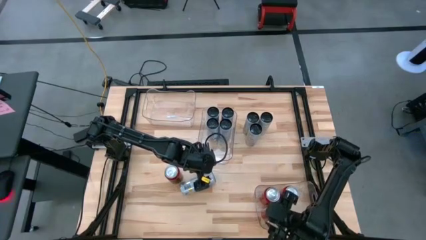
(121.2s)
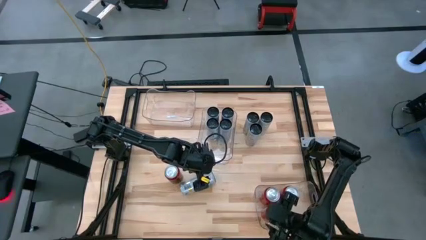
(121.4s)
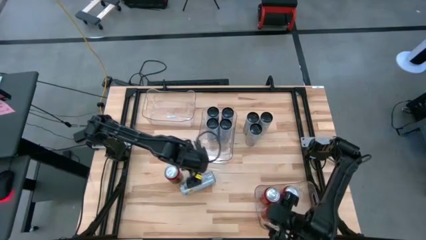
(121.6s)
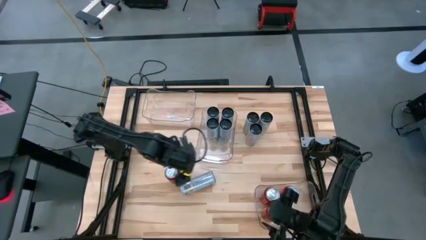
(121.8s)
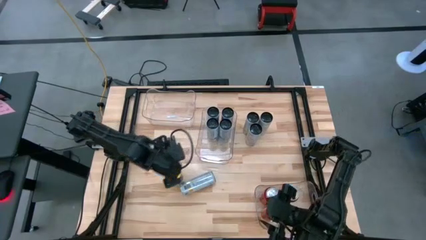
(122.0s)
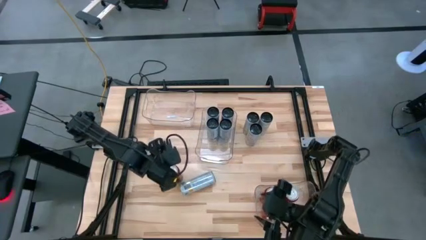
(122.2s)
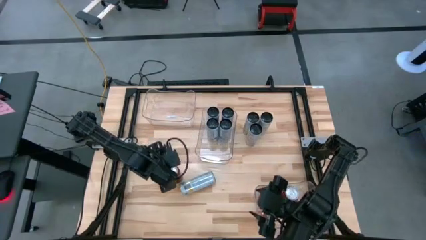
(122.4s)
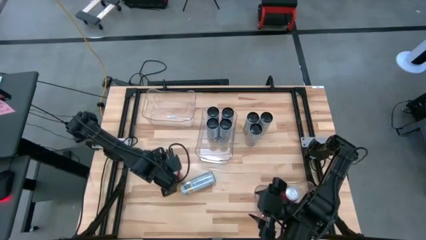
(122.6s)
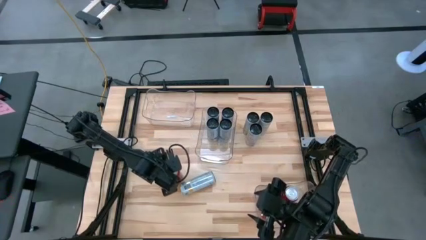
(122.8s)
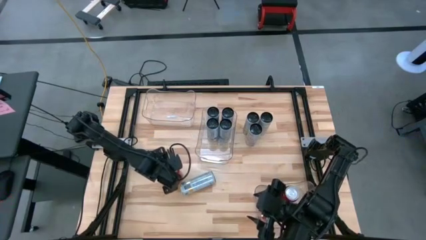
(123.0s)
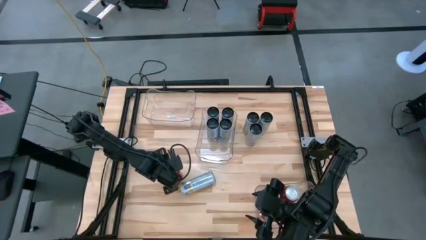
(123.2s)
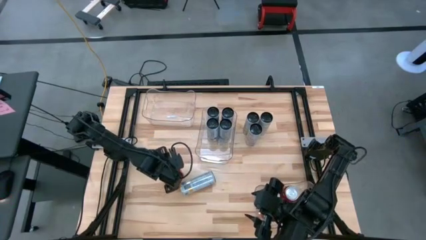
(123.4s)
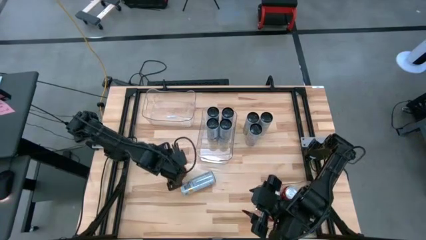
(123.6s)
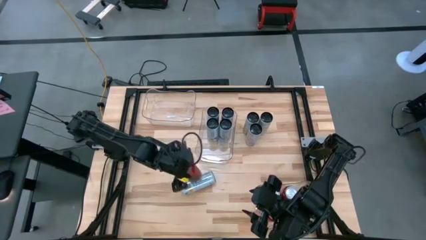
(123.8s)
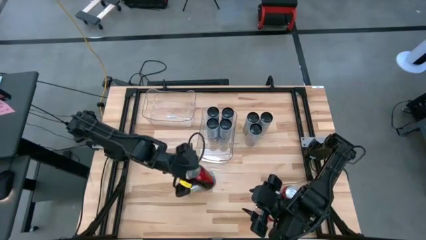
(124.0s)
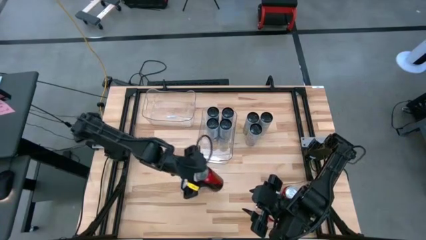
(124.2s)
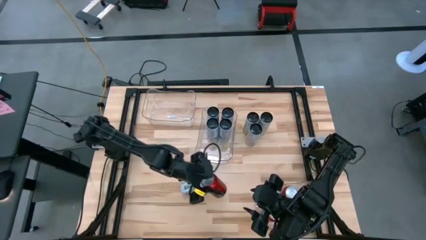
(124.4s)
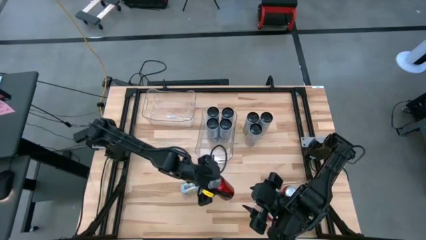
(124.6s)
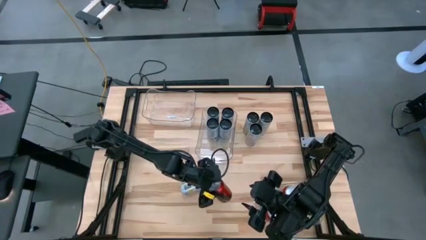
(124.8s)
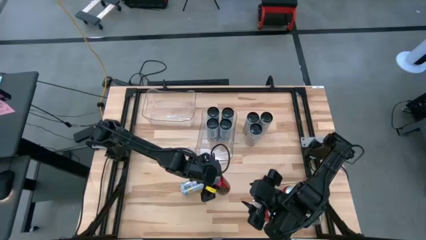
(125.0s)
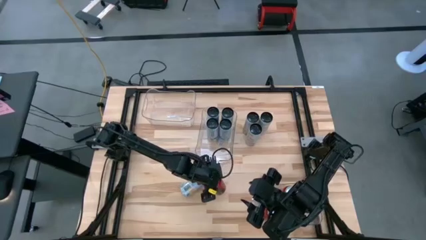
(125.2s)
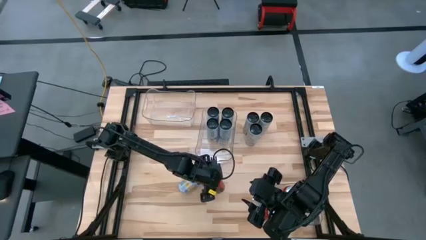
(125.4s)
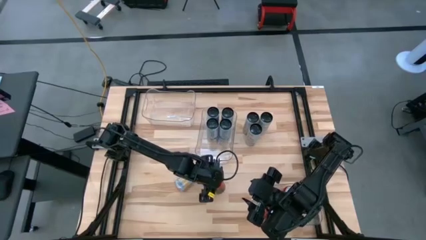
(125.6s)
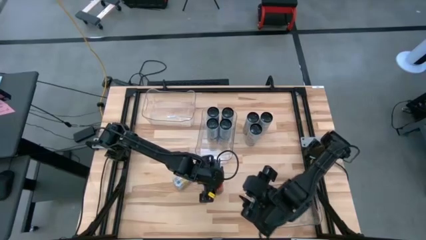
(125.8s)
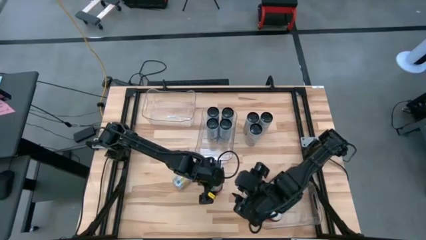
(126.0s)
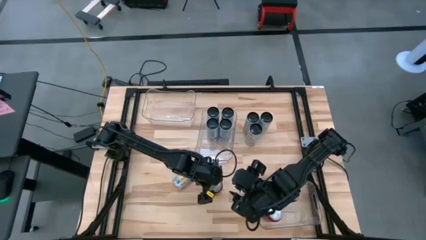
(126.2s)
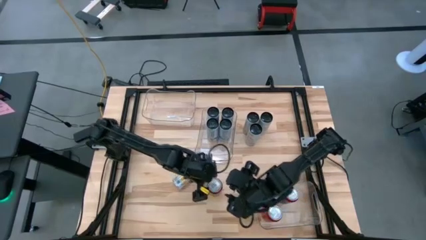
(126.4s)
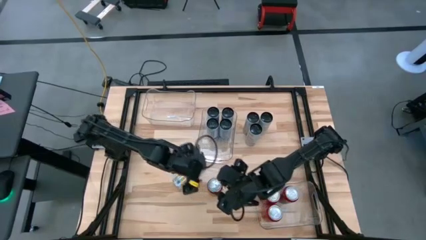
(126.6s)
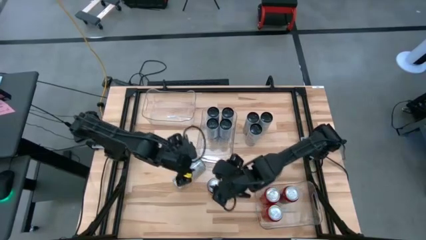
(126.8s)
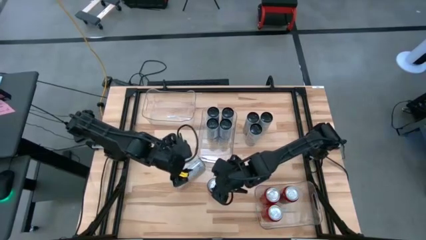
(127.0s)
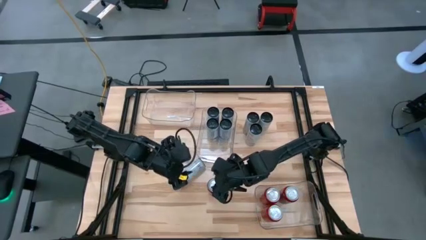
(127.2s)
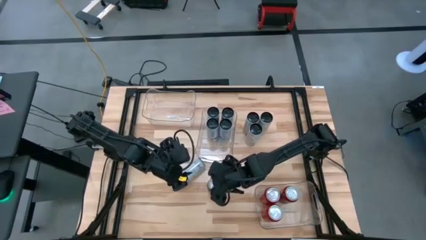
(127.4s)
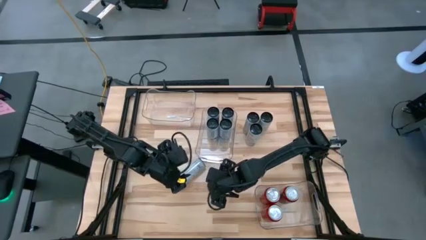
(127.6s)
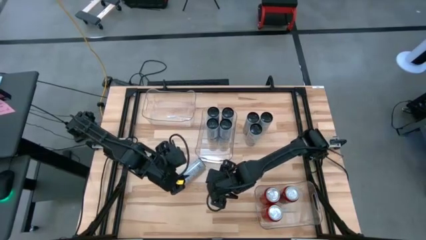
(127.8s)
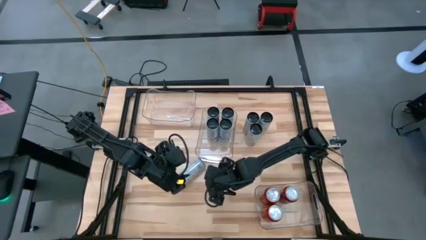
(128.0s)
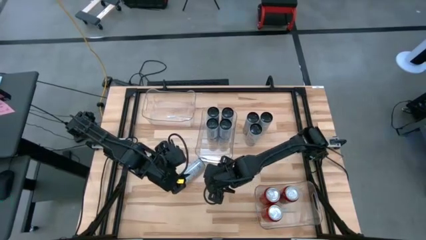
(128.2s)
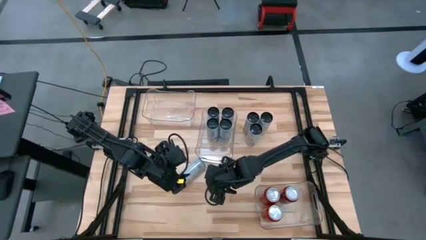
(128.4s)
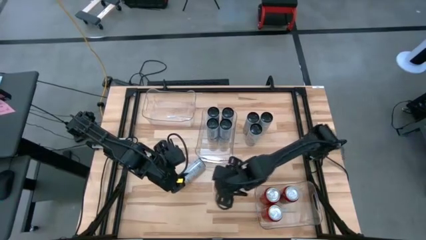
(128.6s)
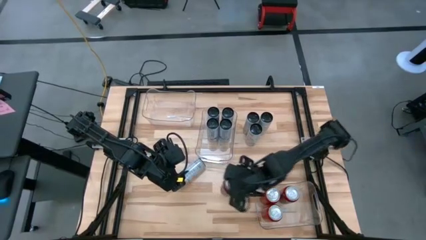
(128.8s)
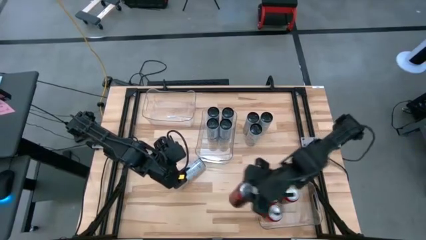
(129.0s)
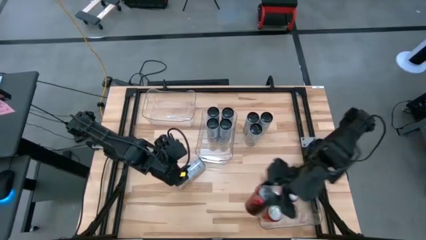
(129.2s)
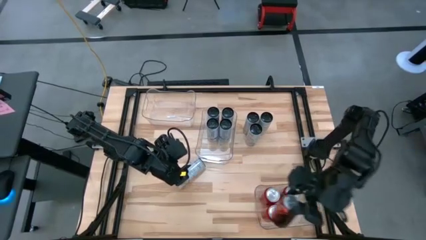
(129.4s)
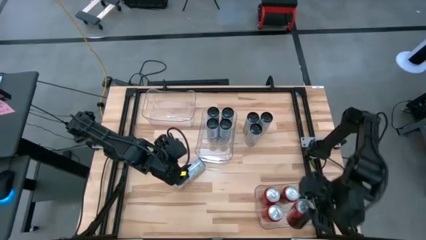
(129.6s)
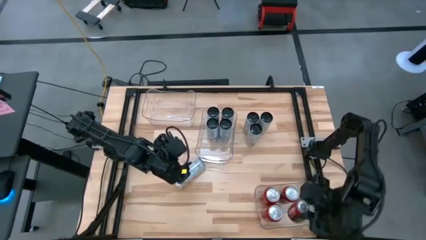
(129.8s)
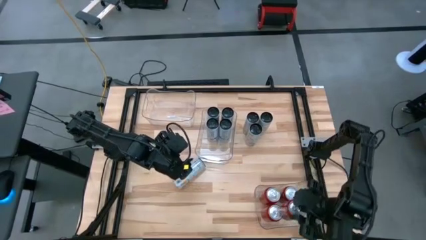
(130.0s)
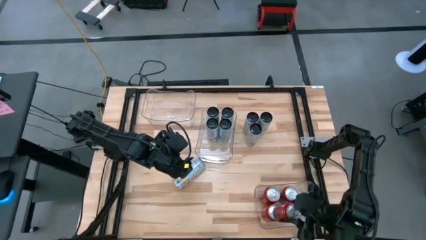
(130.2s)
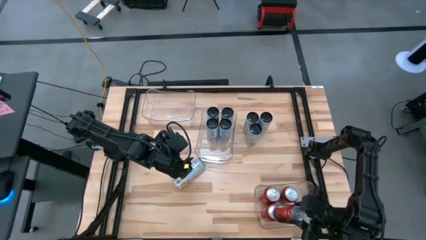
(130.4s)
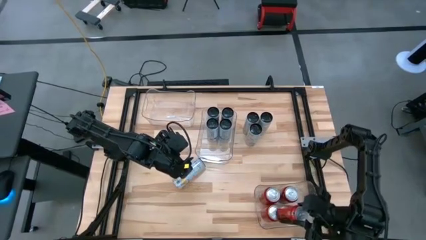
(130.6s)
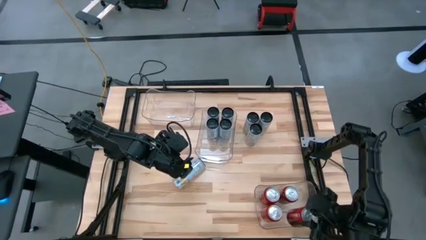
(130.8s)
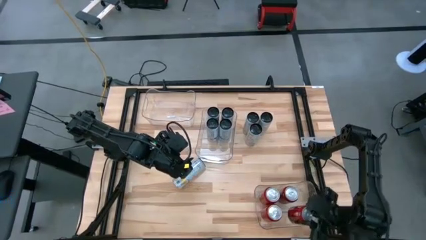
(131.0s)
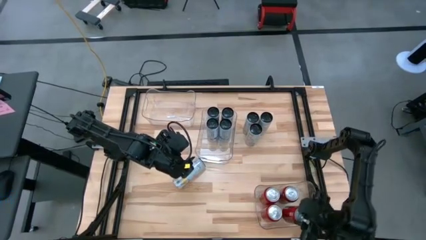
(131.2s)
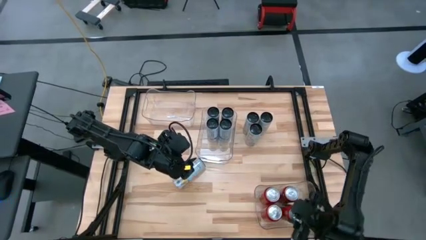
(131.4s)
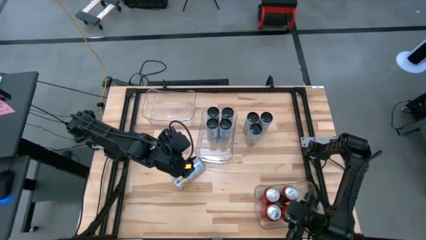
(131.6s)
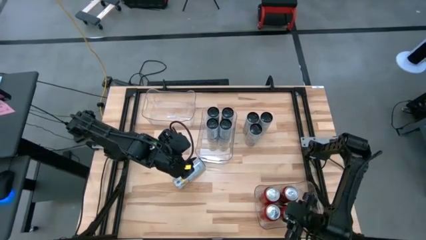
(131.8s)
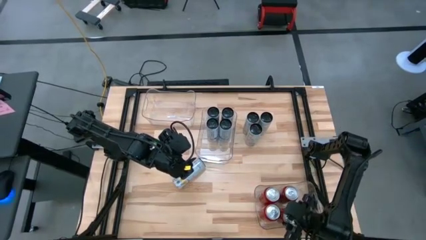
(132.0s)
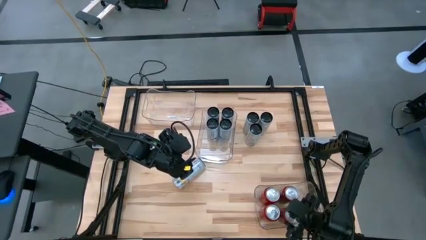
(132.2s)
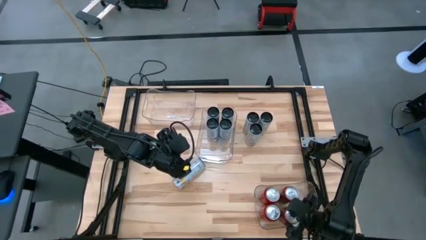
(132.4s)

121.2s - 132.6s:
Task: Sort soda cans
Put the red soda can into the bottom transparent bin

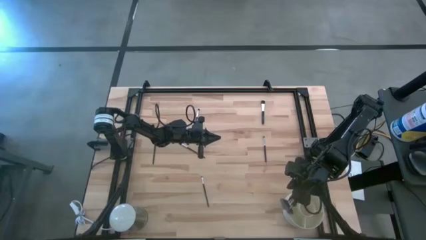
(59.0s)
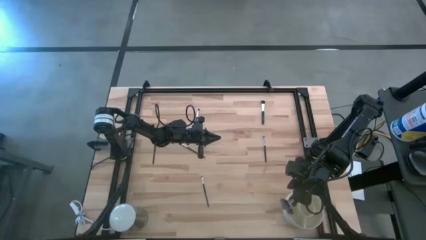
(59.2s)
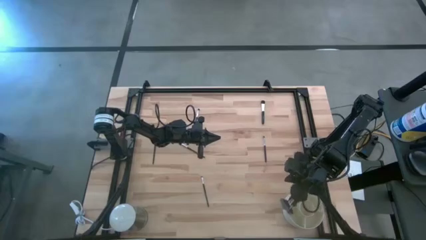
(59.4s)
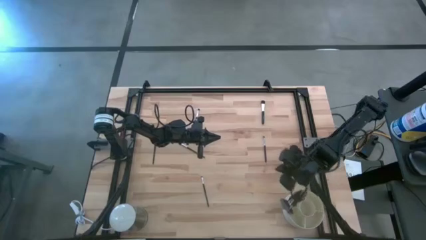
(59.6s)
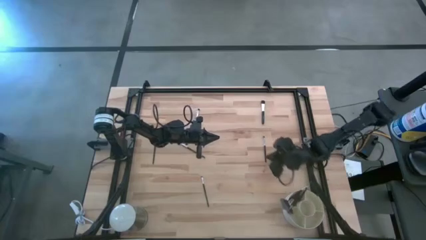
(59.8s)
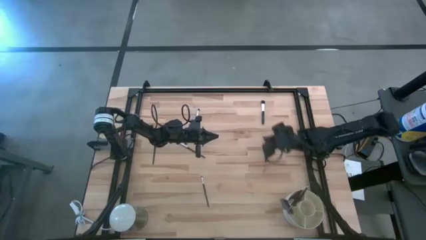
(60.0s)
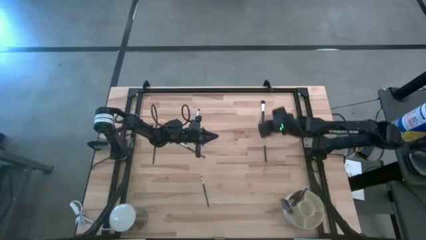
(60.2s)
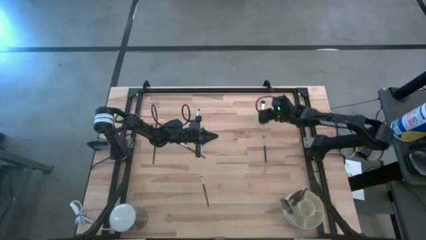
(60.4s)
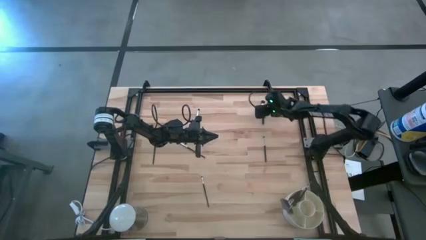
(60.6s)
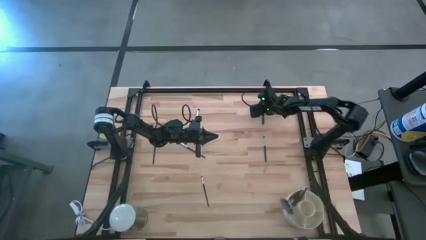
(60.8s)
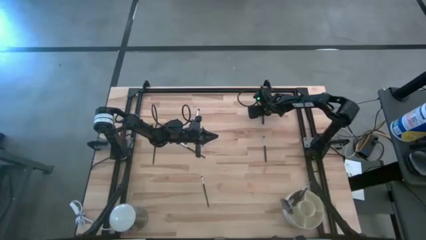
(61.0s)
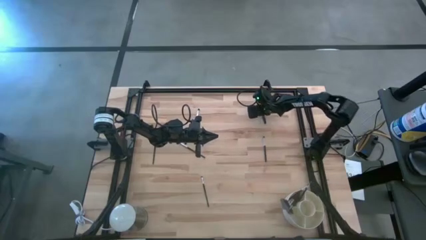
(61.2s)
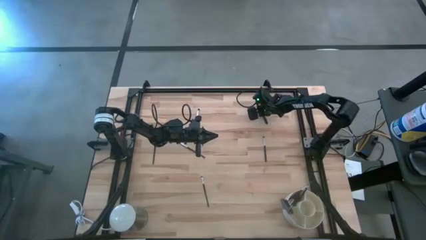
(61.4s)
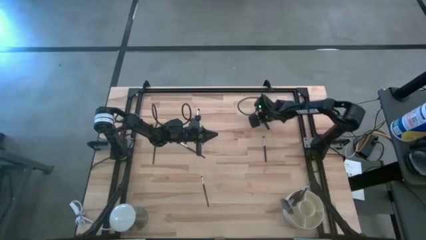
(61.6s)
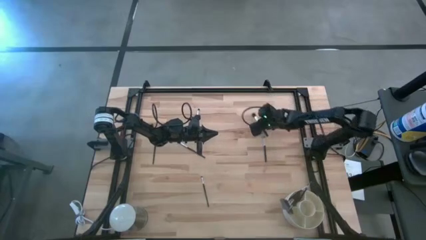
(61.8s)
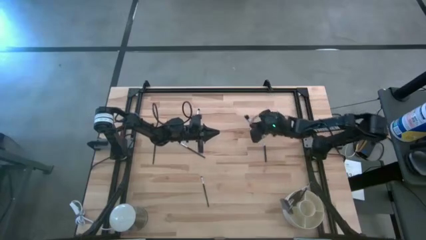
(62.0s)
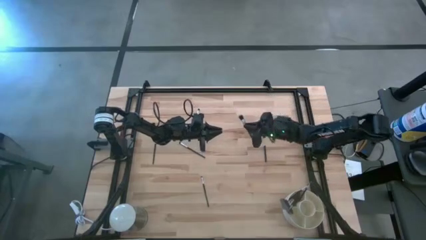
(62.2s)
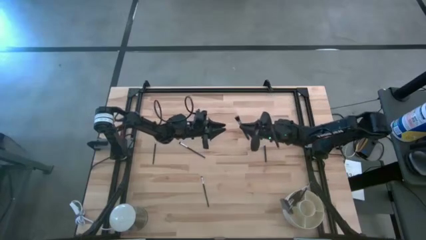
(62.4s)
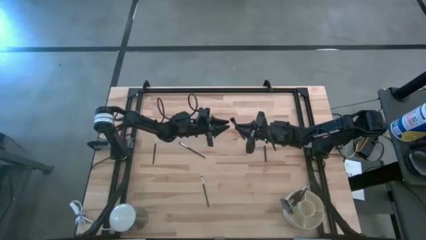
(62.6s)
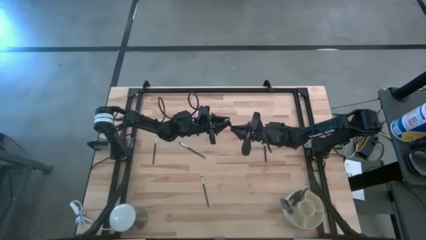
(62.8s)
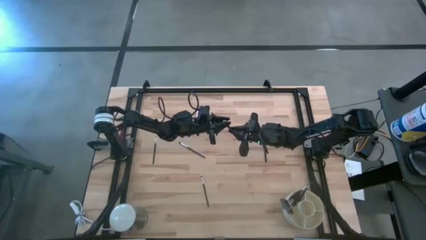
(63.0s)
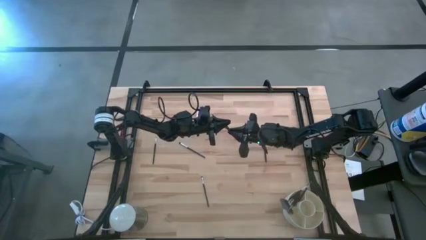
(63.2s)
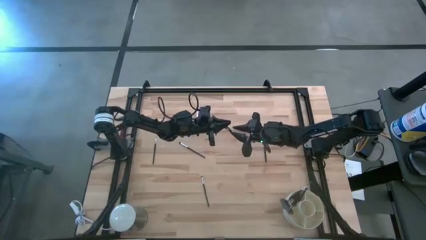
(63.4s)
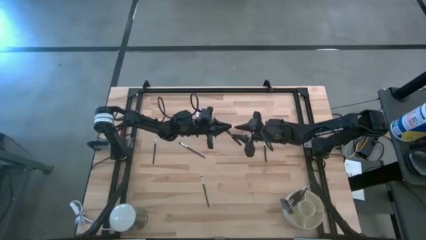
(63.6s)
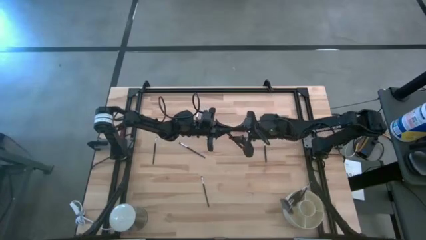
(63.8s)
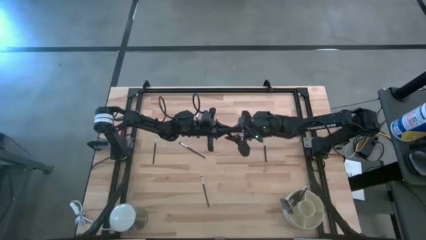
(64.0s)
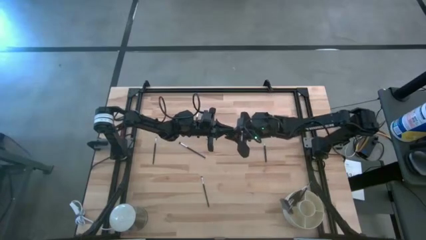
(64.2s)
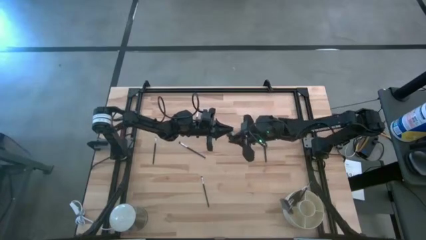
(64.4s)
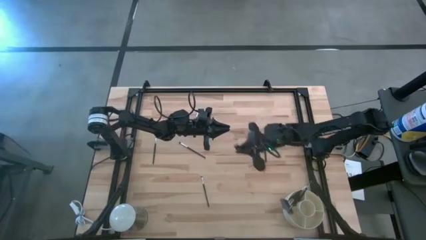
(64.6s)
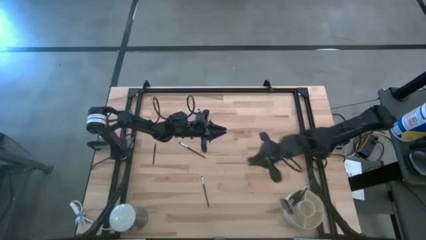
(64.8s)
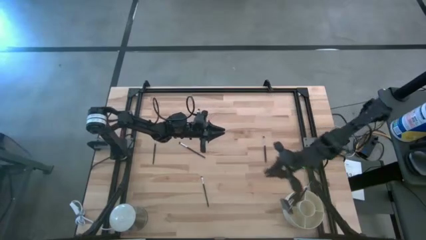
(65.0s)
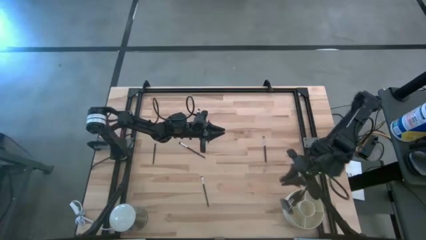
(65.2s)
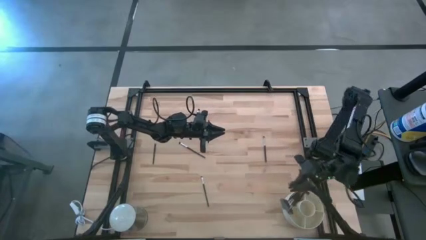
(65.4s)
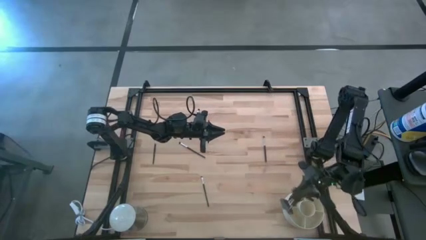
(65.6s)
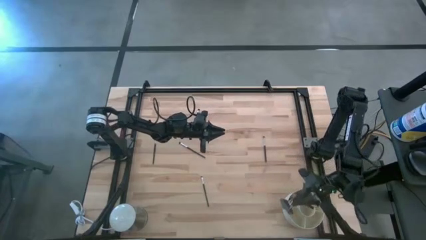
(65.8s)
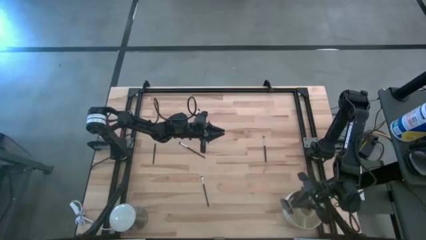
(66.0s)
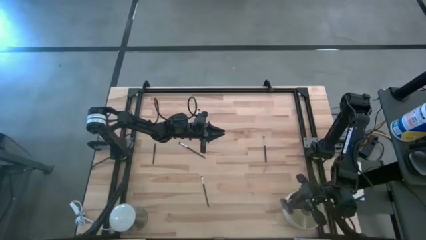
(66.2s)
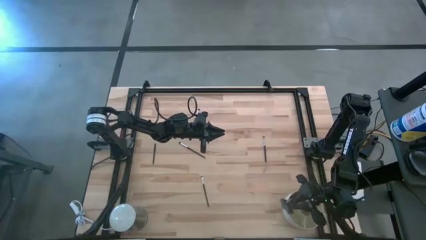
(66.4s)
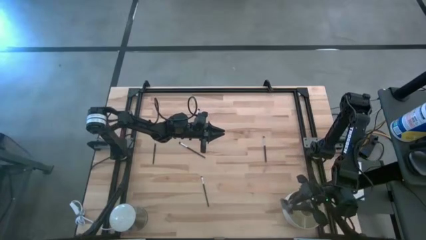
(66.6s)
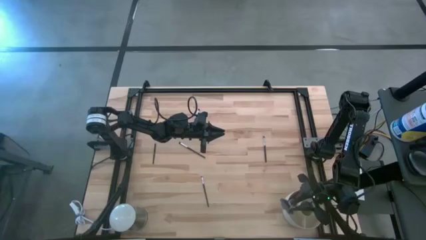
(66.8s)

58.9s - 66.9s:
Task: Put items in baskets/containers
Put the black blush brush into the white organizer
